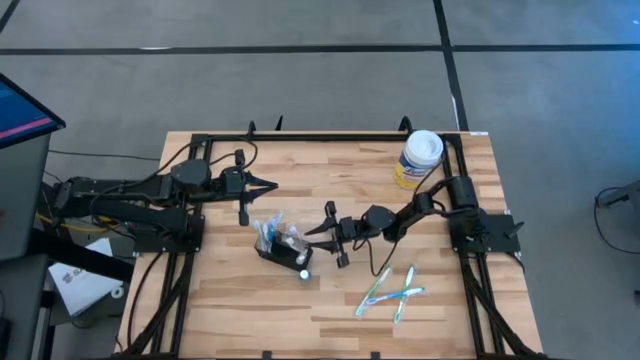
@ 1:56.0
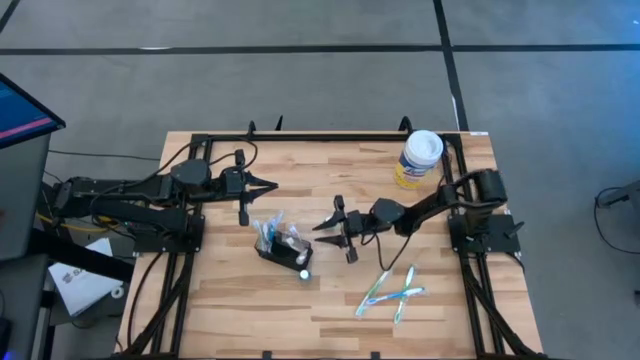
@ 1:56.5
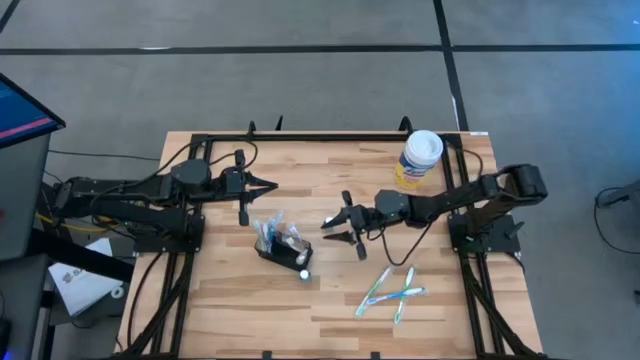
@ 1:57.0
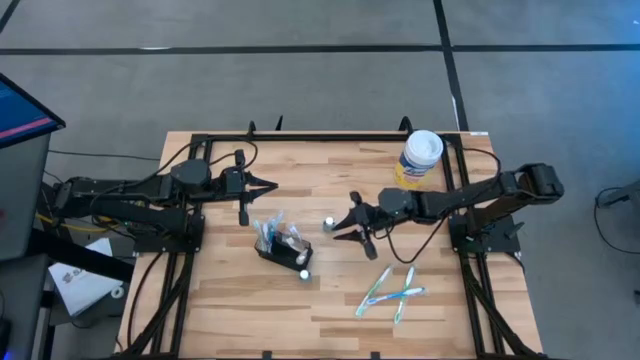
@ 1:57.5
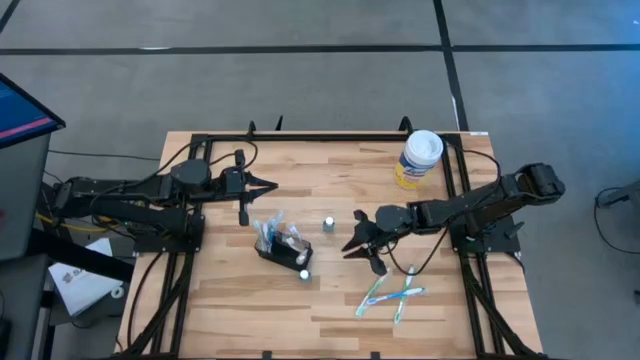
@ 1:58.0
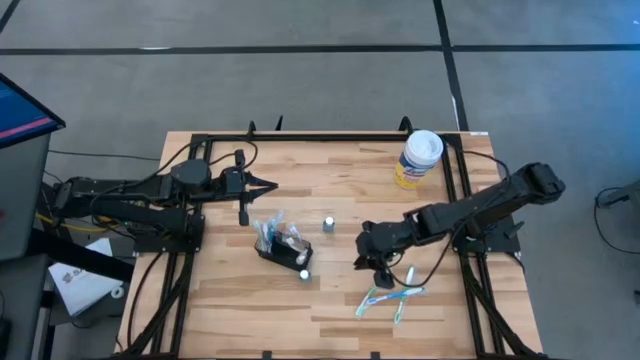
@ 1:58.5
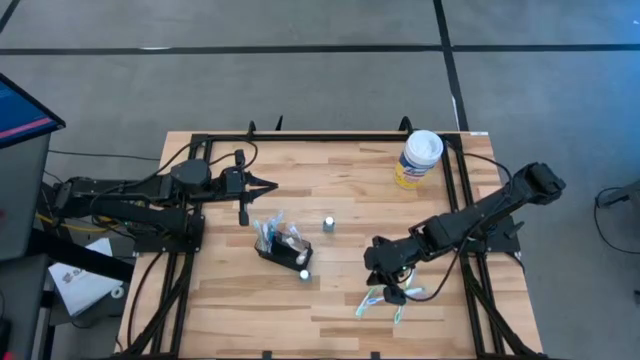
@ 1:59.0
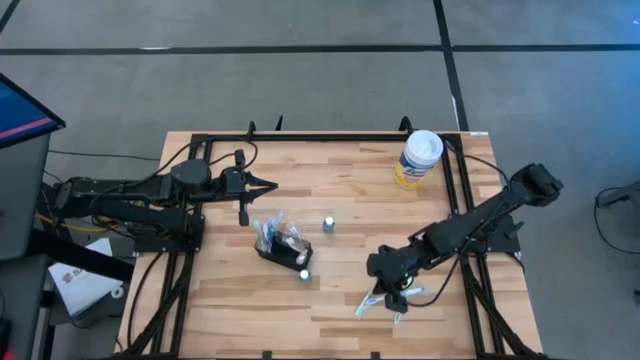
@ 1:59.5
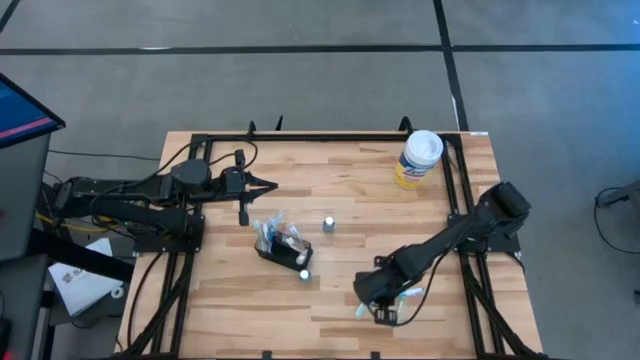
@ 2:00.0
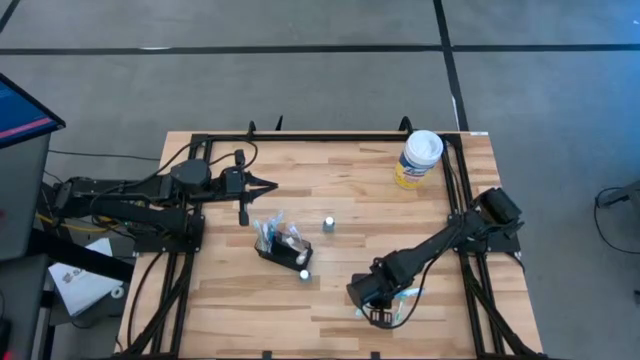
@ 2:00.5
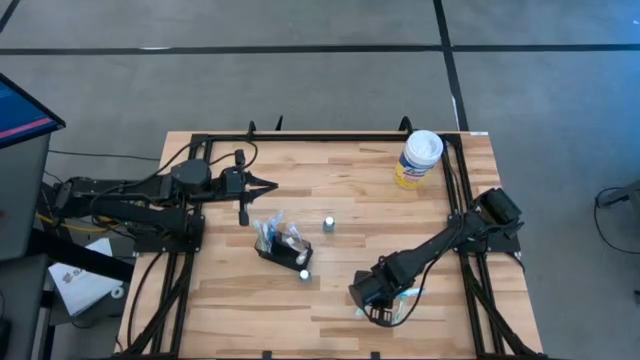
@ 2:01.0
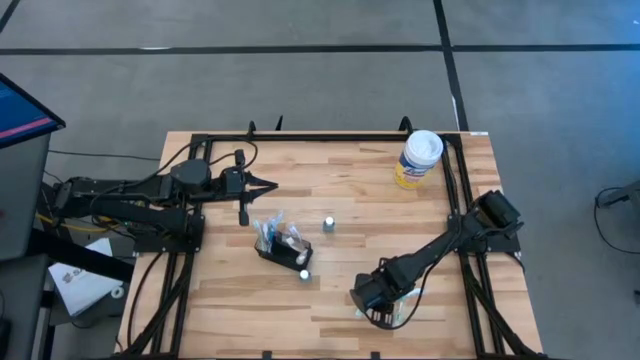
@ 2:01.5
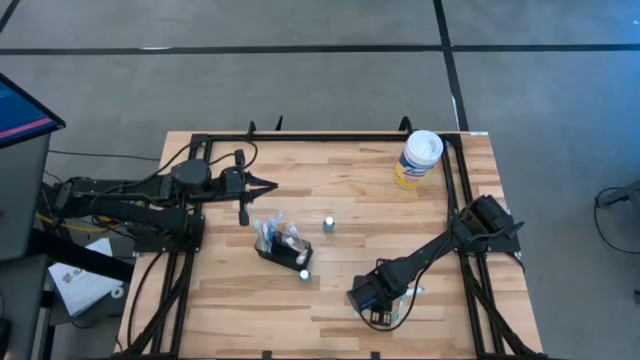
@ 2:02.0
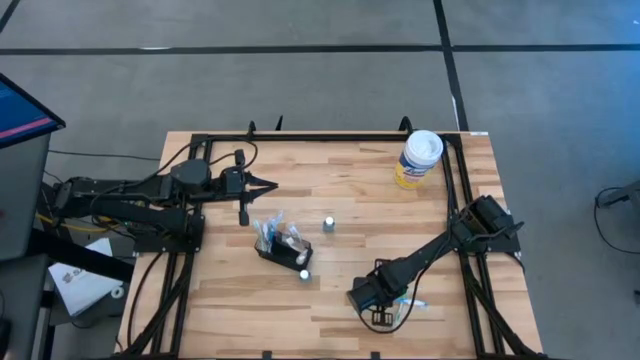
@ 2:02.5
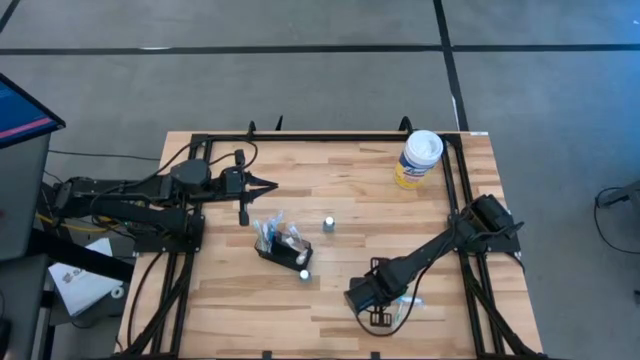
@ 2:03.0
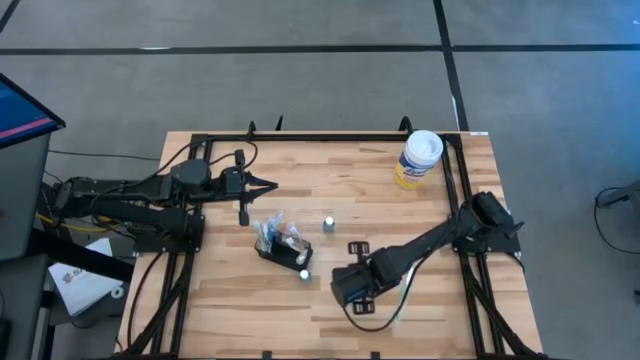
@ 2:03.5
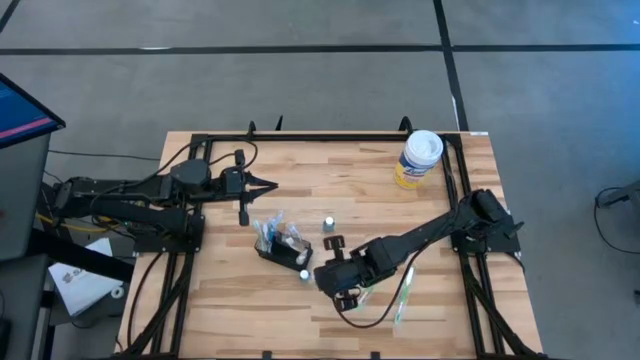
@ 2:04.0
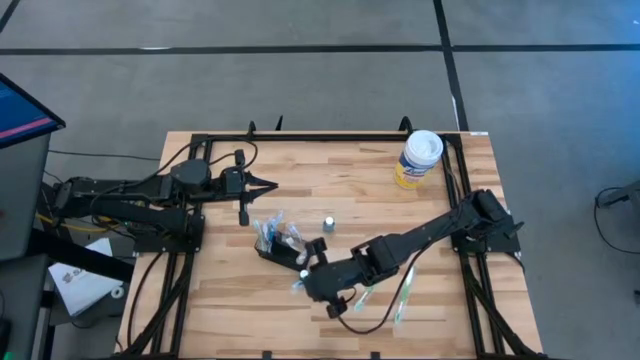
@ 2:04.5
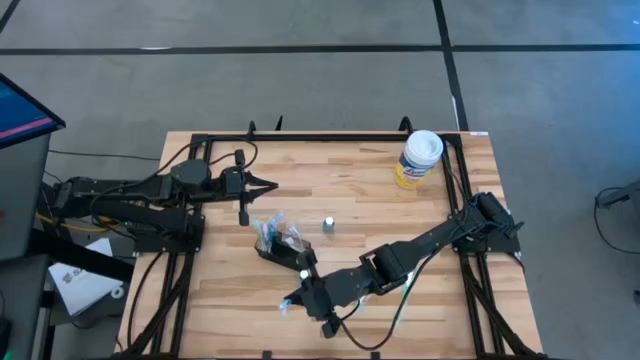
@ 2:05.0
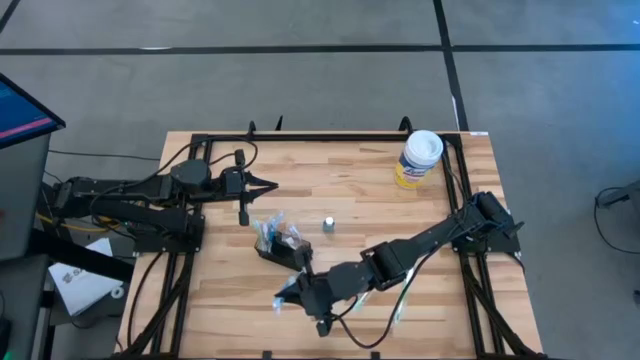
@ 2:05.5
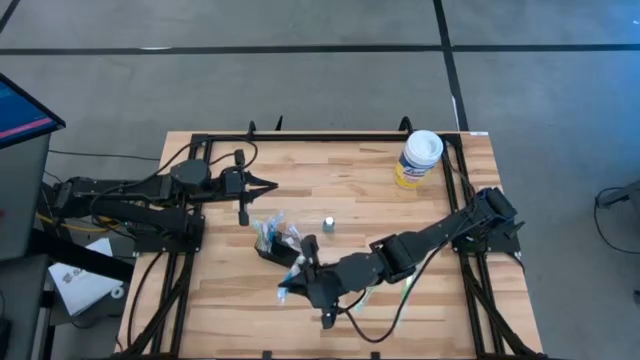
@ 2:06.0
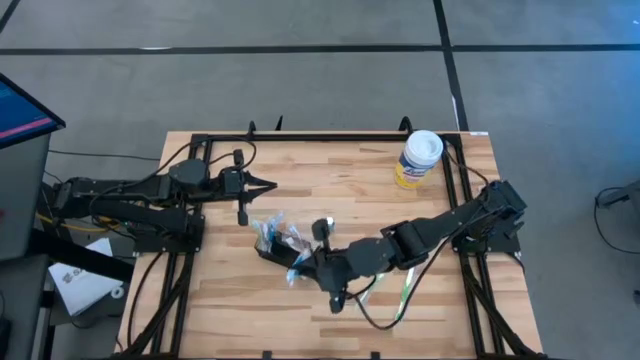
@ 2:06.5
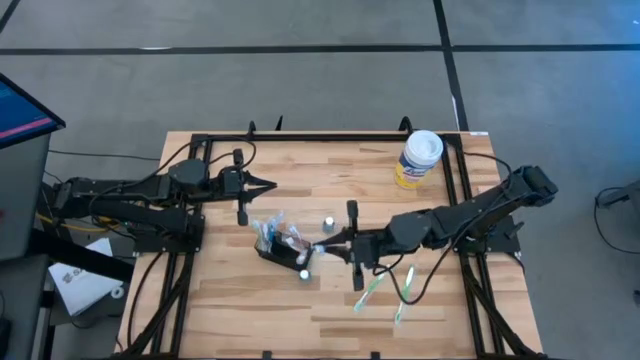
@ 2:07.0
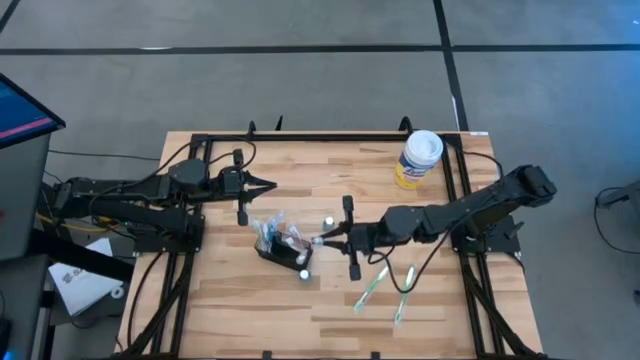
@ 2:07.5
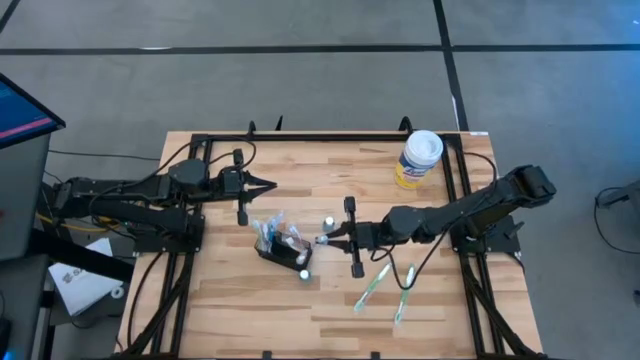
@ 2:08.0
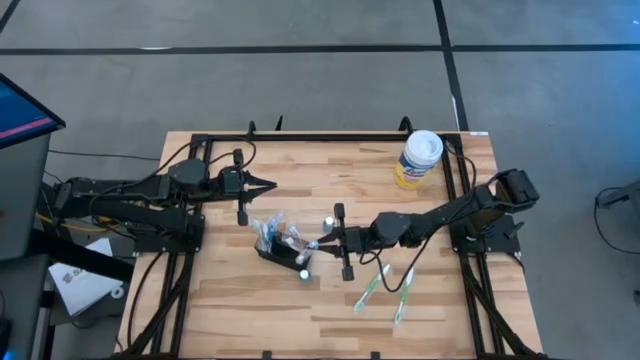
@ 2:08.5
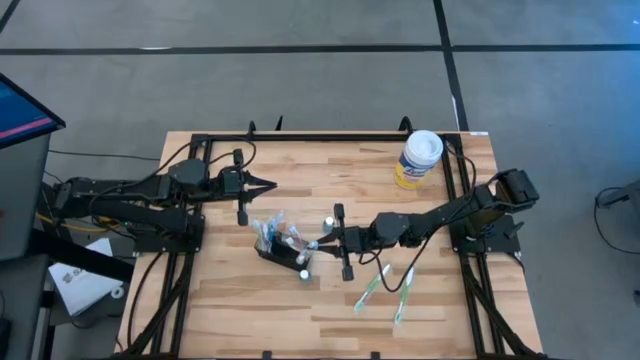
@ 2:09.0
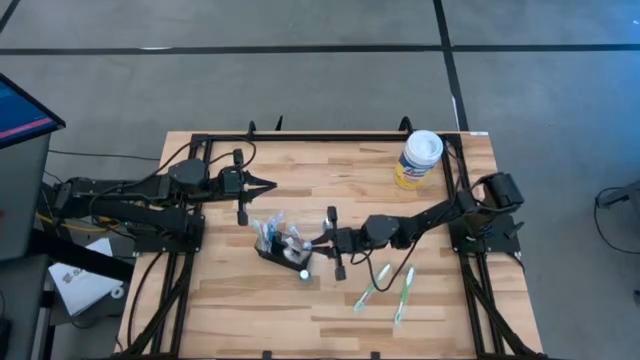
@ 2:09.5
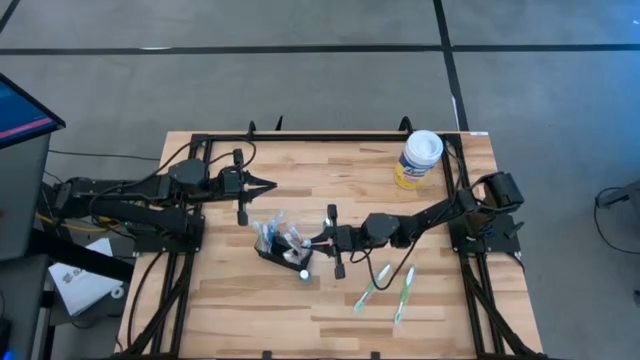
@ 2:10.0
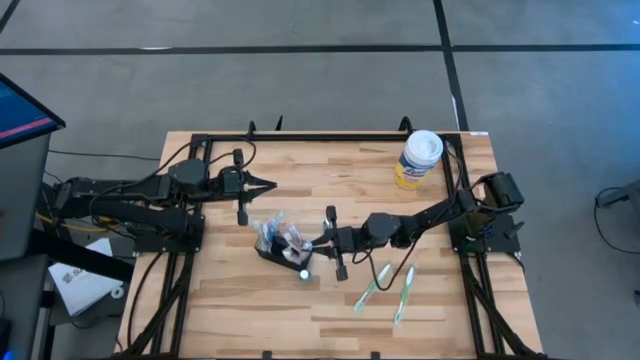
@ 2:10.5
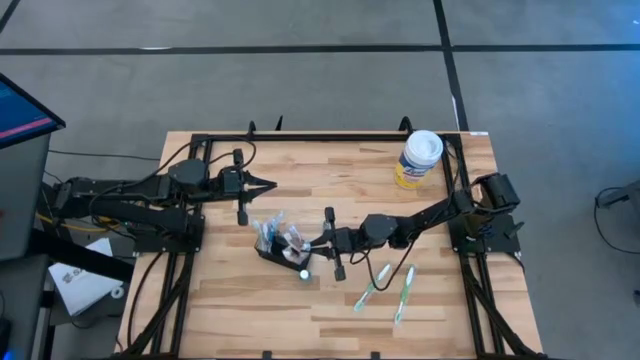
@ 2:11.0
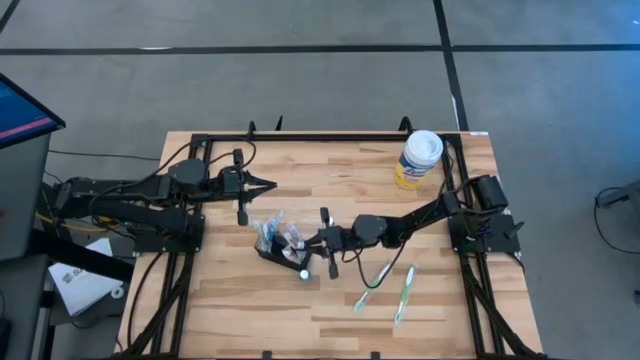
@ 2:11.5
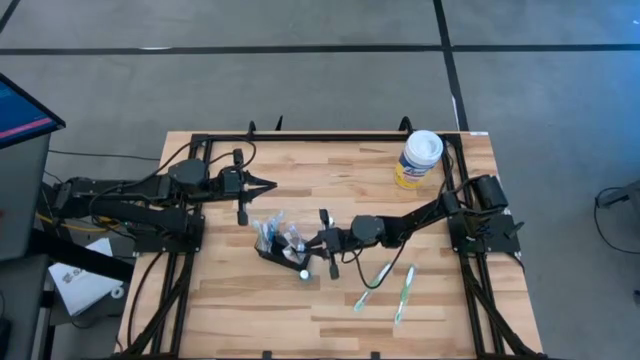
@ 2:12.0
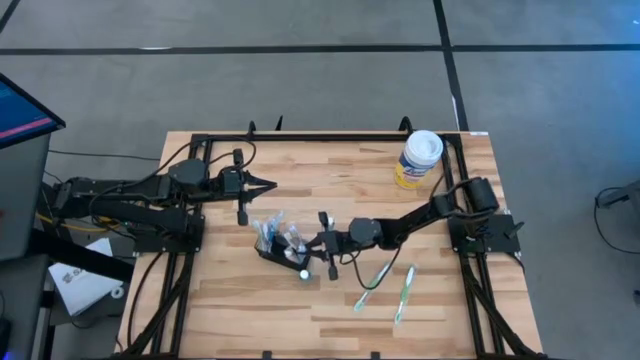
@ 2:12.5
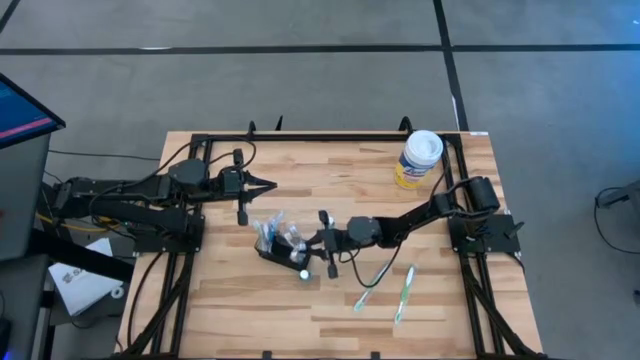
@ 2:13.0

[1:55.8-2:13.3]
Task: Pick & Place toothbrushing station
Put the blue toothbrush into the left compartment of the wire organizer

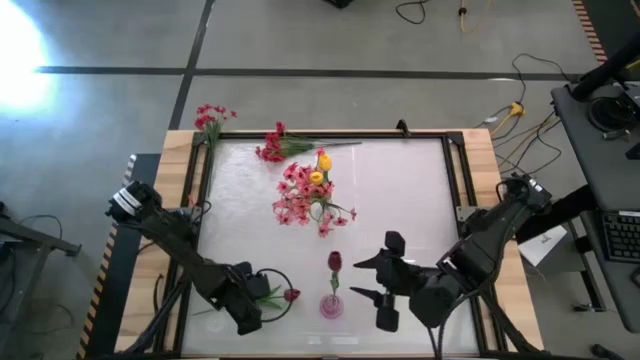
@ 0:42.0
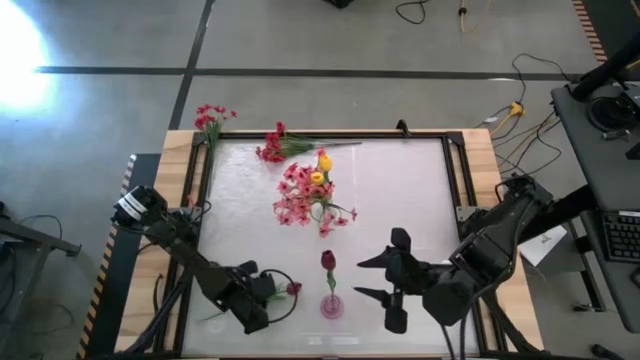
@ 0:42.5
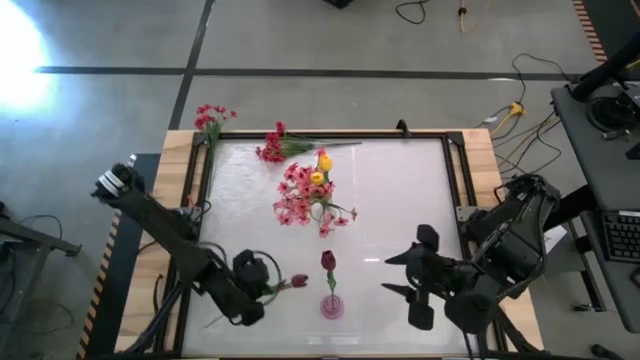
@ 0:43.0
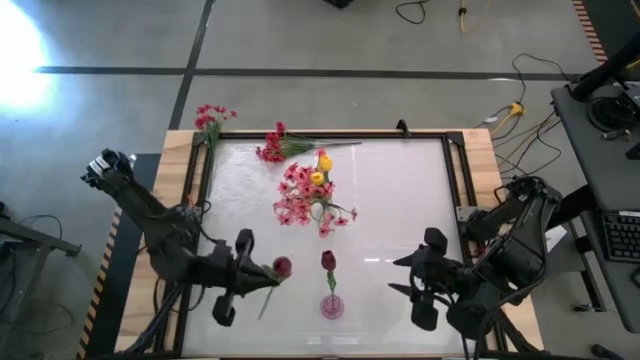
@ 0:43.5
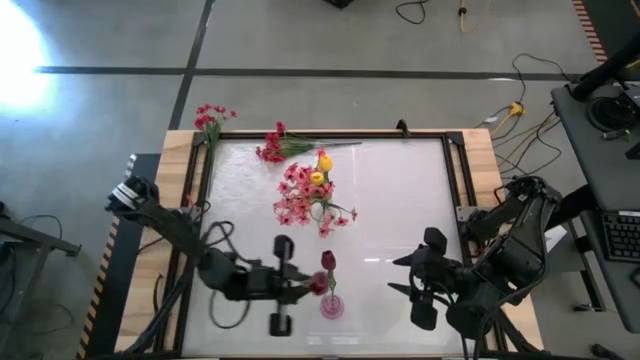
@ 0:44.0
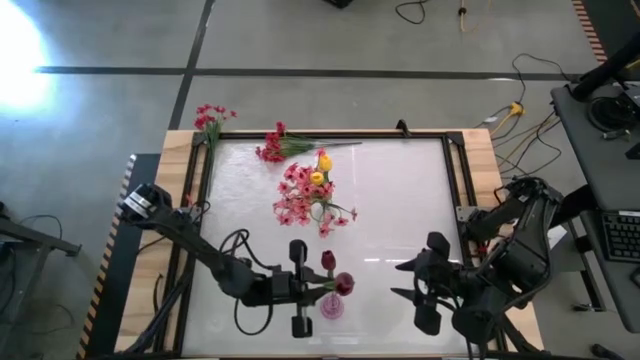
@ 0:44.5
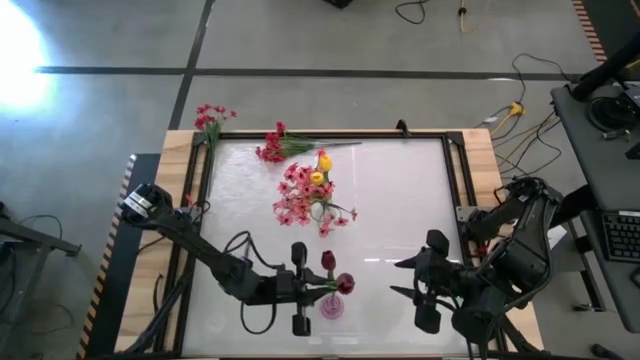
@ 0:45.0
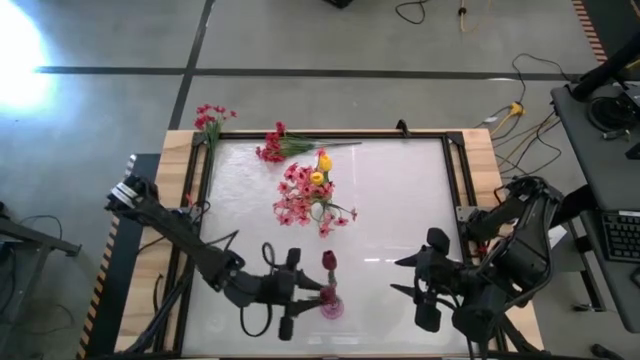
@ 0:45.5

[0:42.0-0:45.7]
Task: Sort flowers into vase by color
Put the dark red flower into the purple vase
